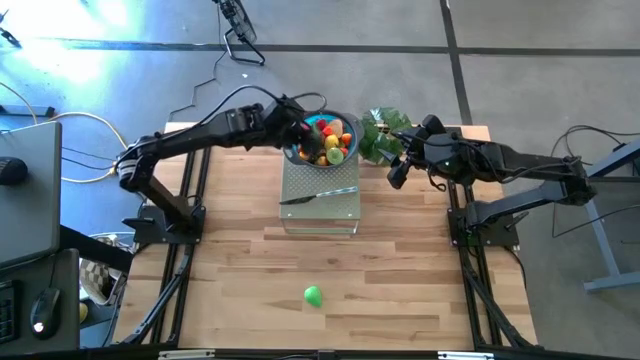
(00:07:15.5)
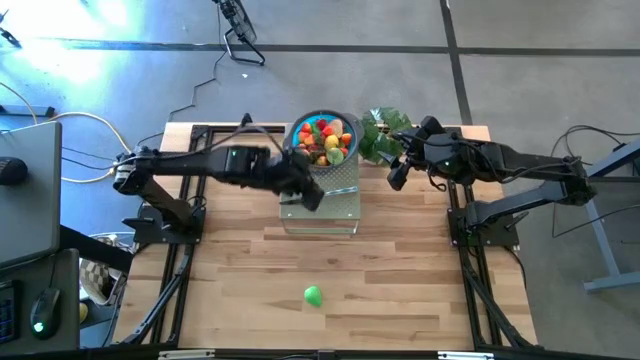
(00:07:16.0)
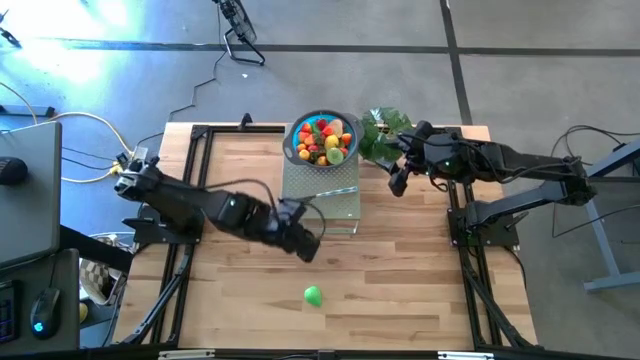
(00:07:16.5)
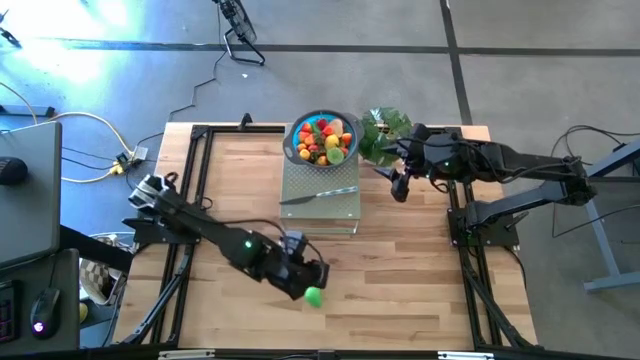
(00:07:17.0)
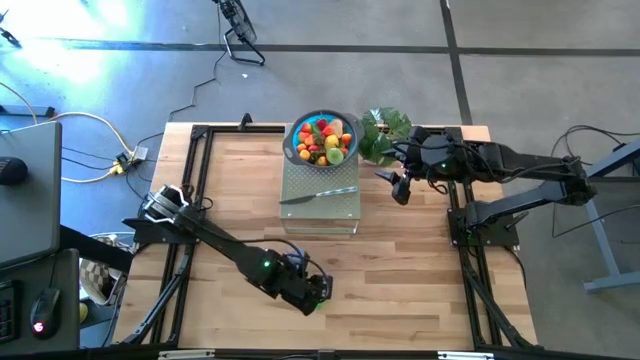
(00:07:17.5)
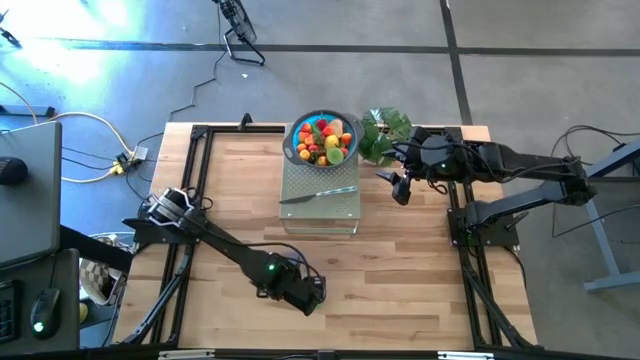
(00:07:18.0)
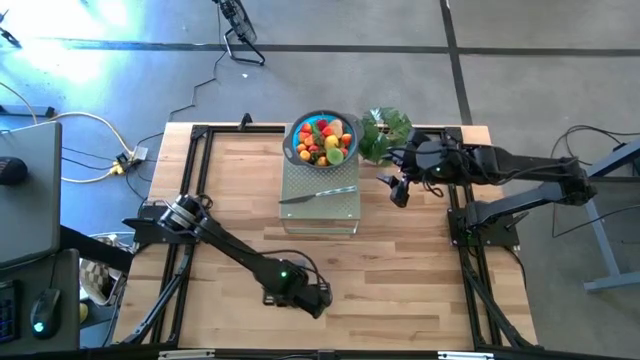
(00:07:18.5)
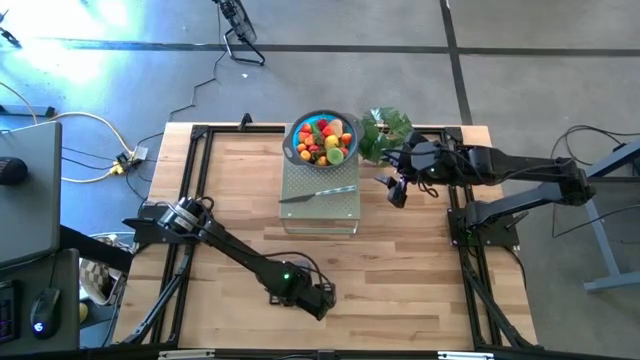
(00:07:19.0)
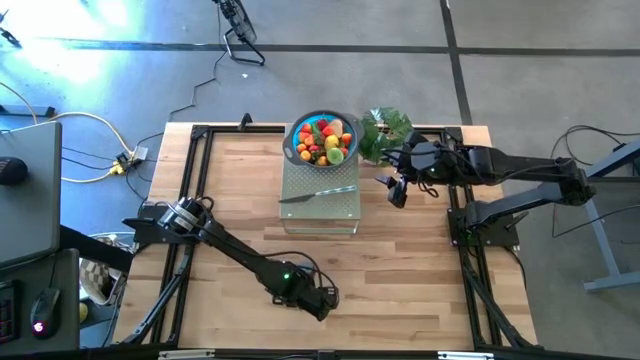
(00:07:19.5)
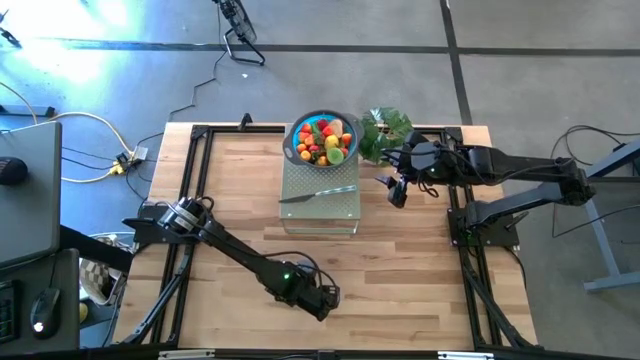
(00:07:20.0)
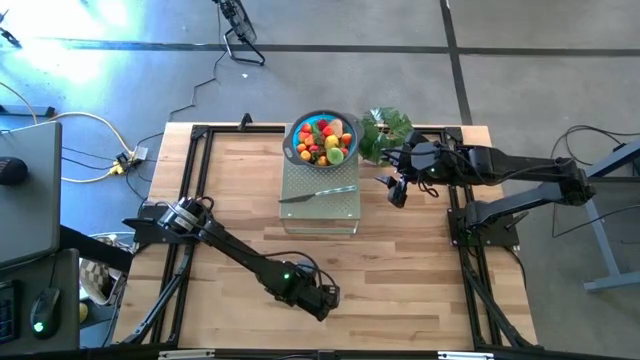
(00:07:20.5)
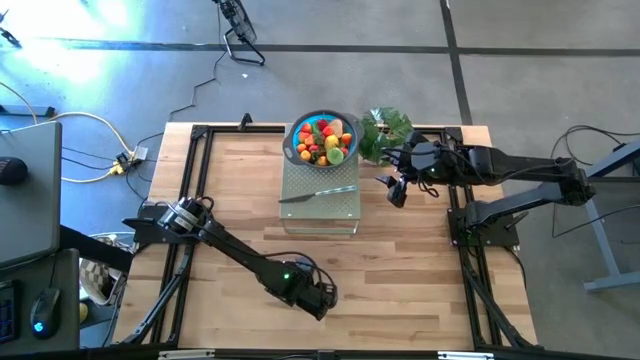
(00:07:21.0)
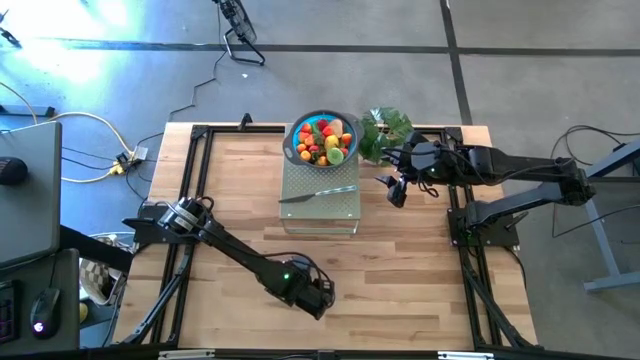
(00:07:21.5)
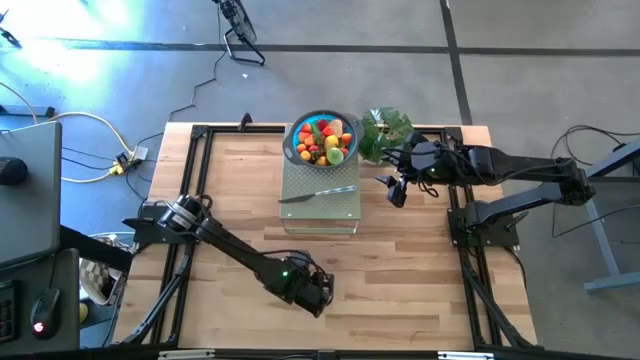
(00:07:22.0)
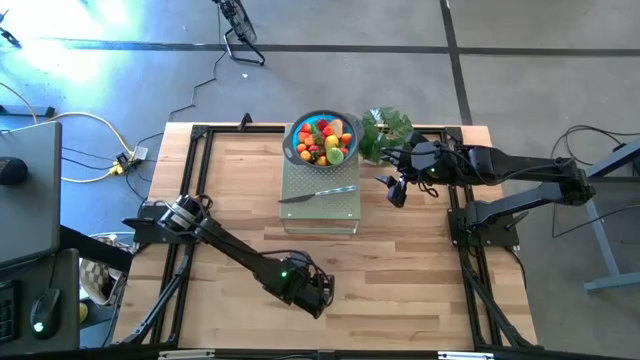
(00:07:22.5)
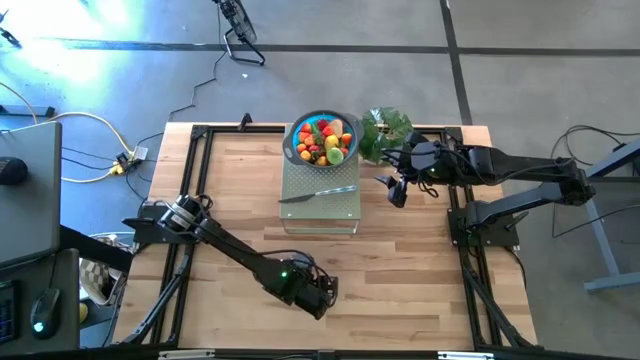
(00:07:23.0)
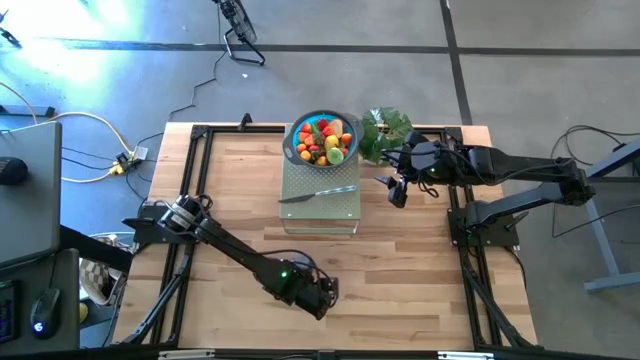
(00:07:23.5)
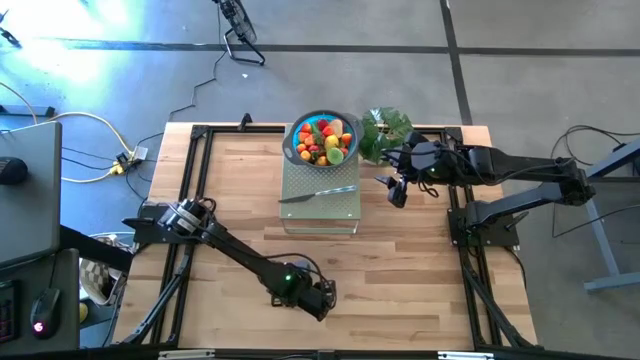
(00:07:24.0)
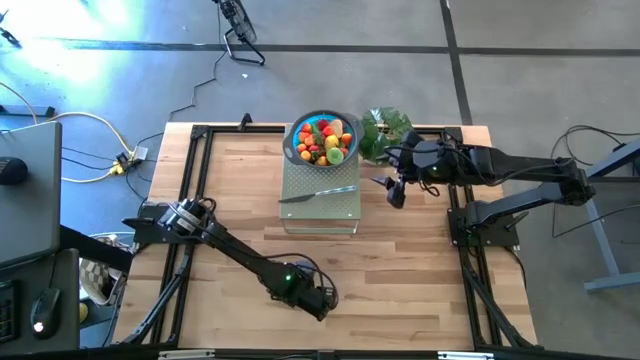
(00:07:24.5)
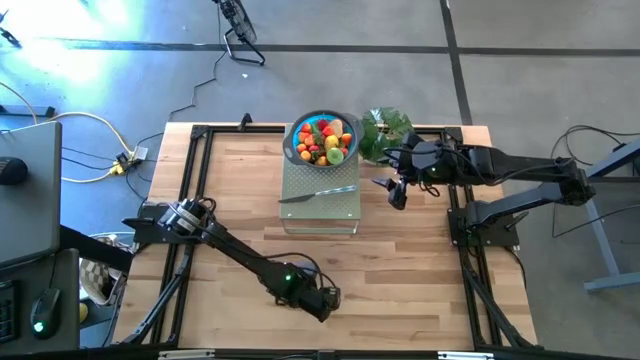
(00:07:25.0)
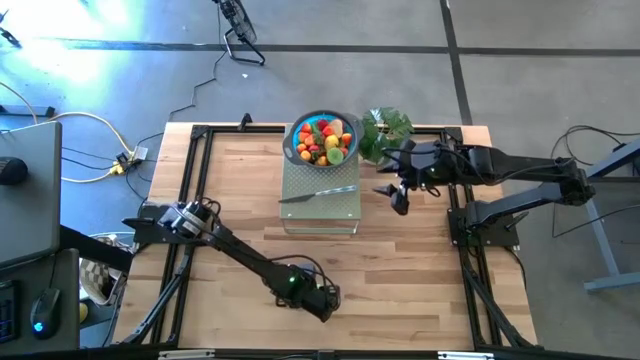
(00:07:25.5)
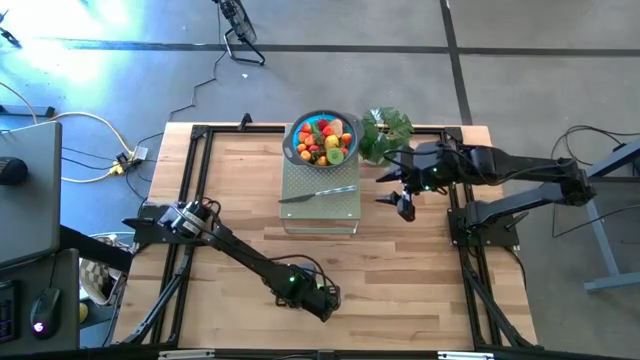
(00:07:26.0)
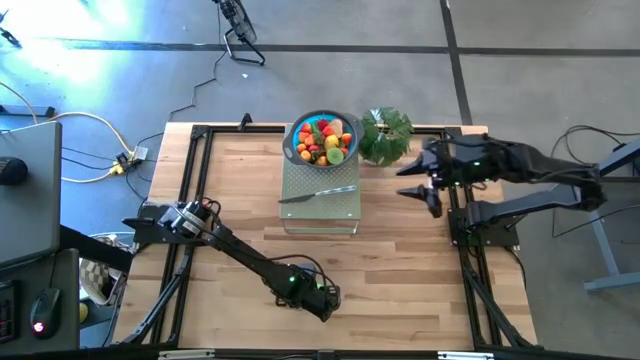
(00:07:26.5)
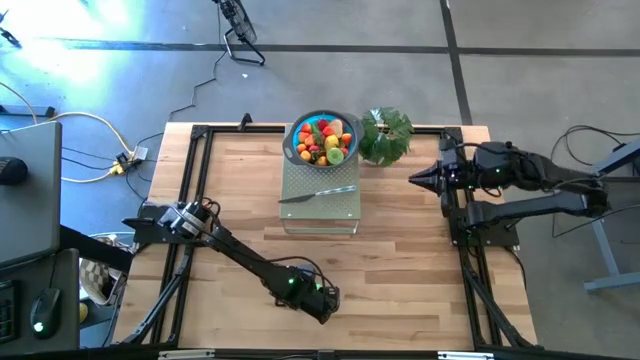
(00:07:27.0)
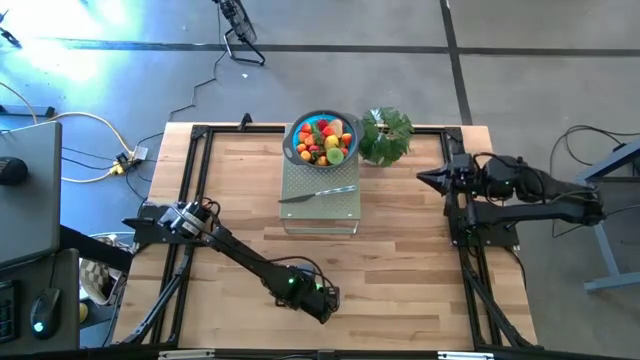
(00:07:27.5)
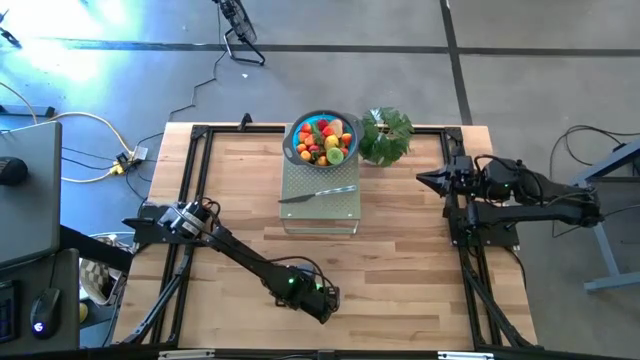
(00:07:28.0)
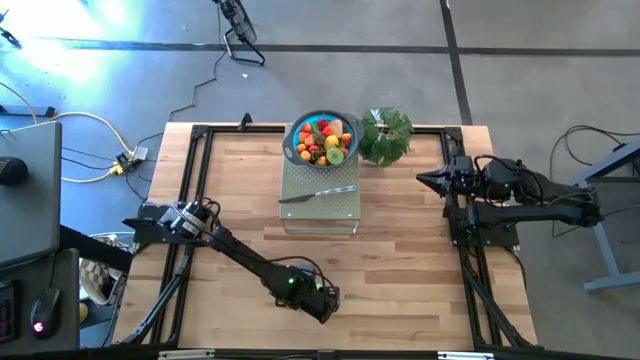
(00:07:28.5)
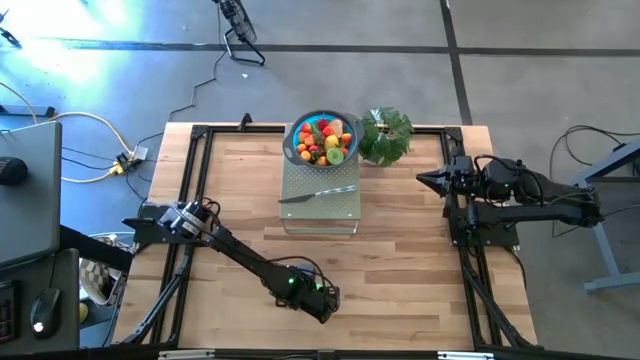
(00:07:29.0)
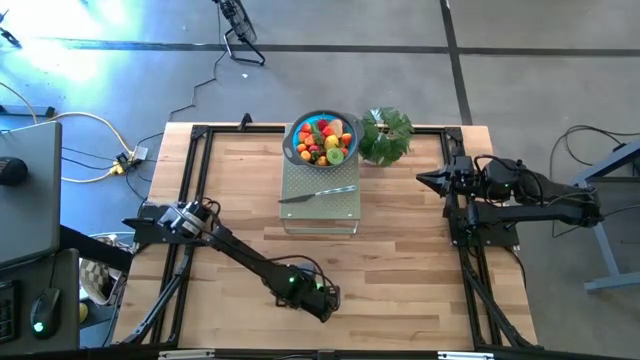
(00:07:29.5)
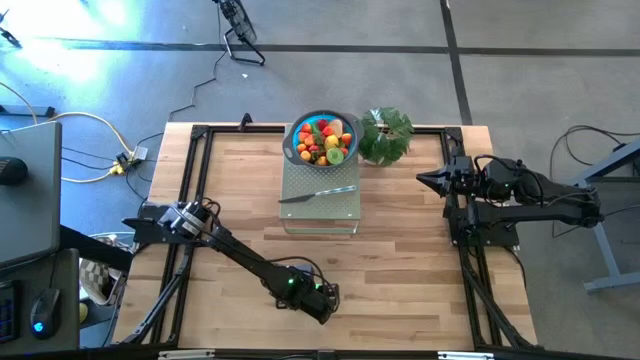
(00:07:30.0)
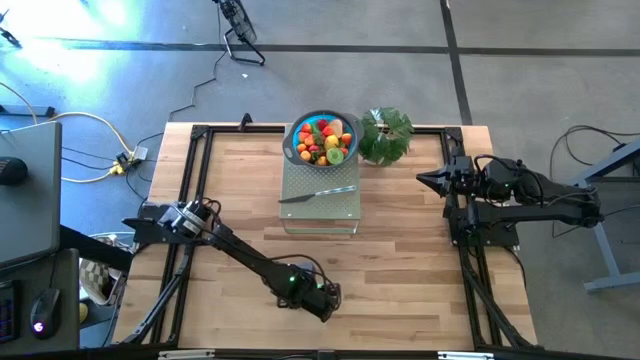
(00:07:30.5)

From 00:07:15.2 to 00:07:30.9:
Task: Pick & Place Fruit
Put the green pear in the blue bowl on the shelf

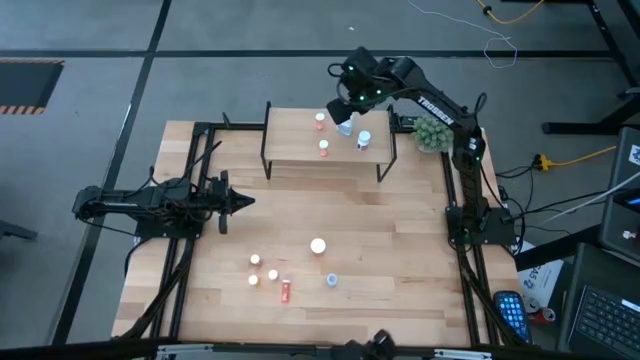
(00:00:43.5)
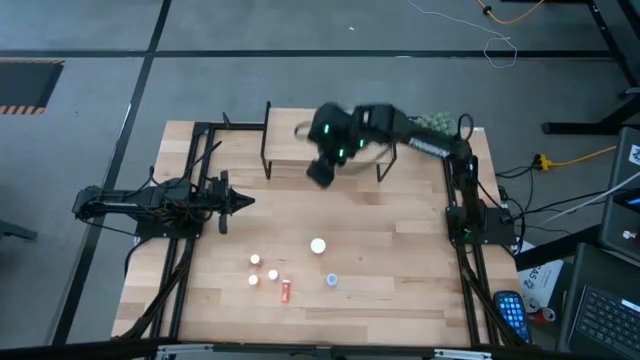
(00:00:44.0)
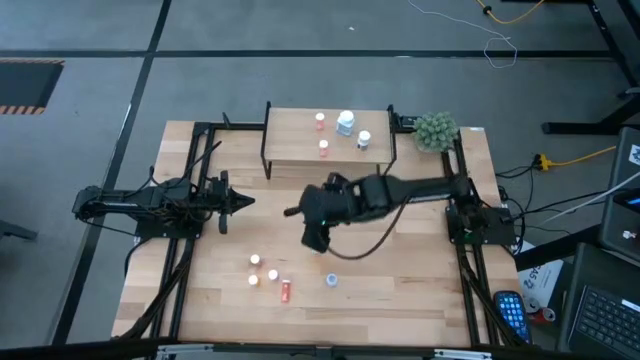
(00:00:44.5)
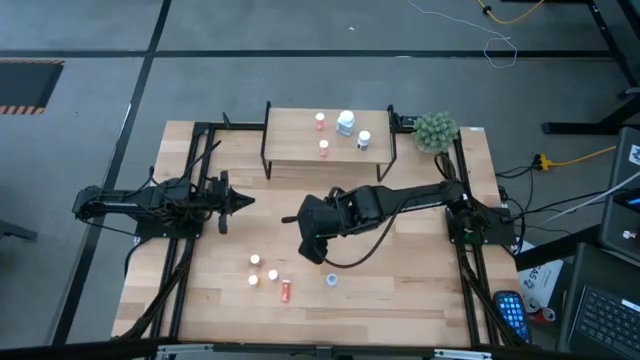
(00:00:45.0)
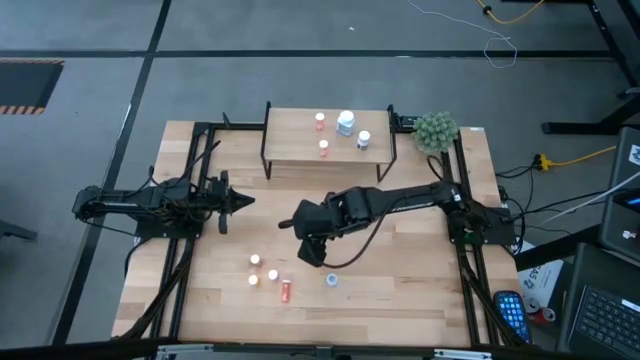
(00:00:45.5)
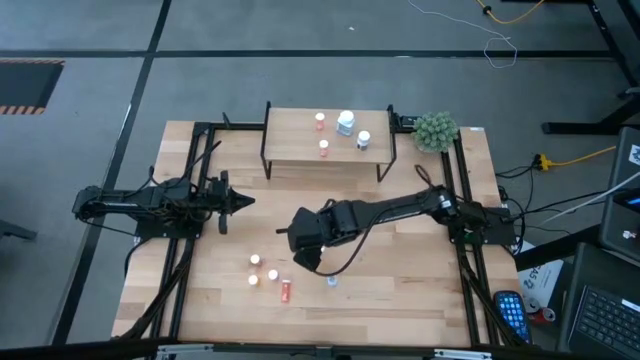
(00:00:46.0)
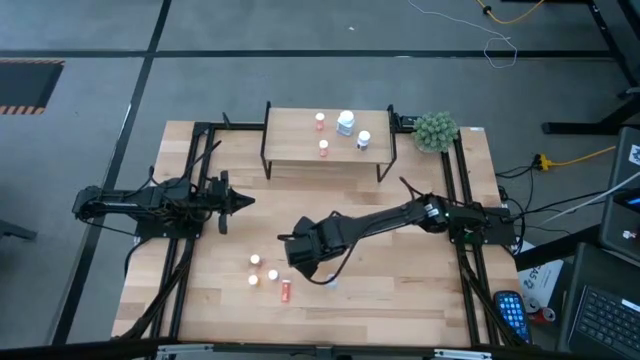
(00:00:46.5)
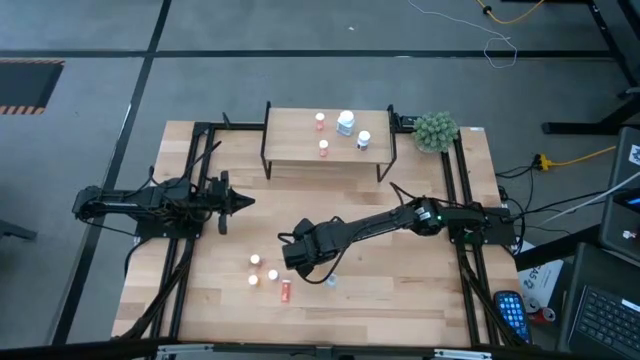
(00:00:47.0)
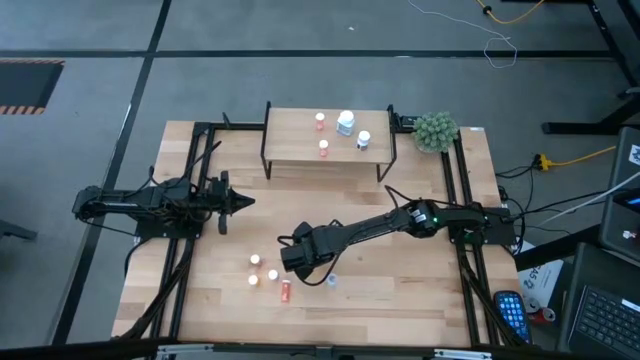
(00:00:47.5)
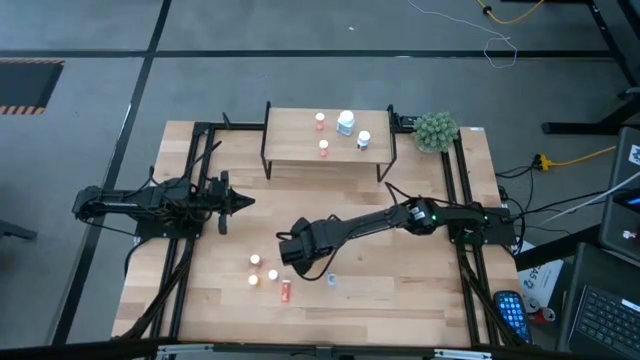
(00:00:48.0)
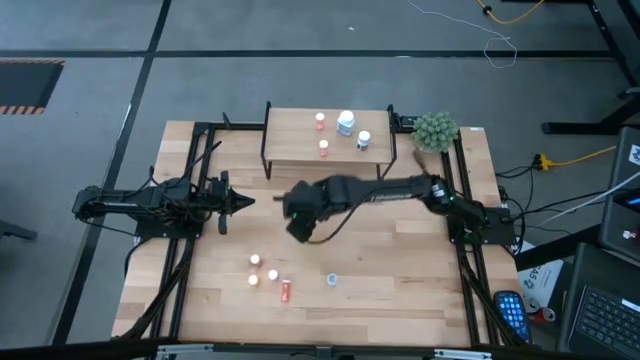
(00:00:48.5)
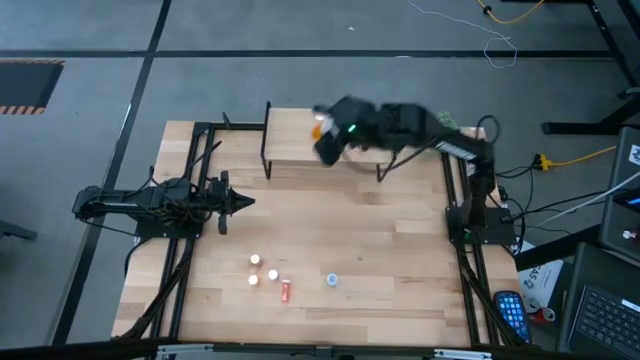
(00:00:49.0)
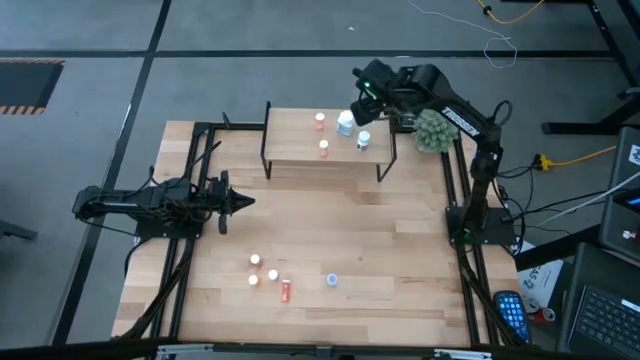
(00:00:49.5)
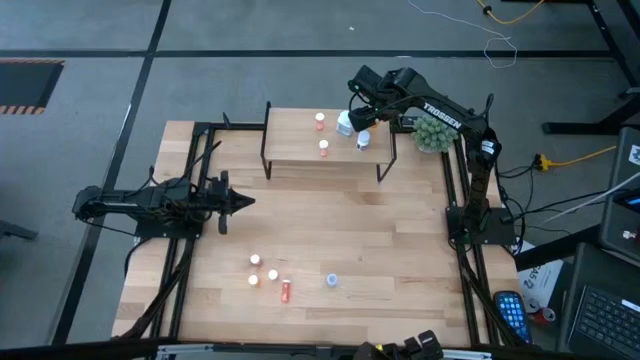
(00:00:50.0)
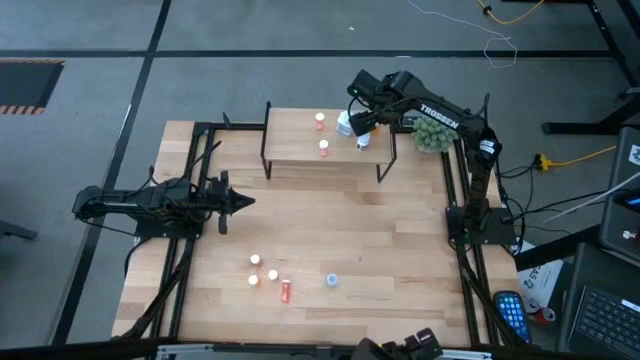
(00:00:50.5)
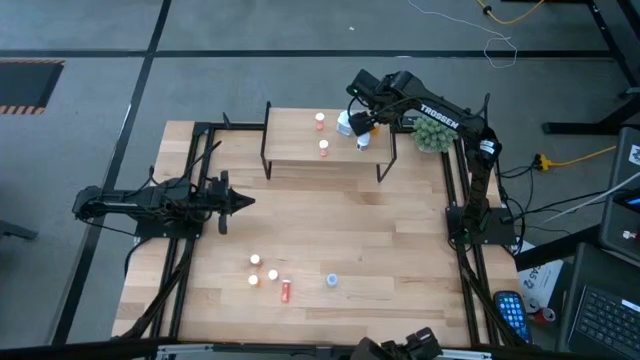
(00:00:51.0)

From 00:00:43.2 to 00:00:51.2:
Task: Pick and place medicine bottles onto shelf by color
Put the large orange pill bottle on the shelf
